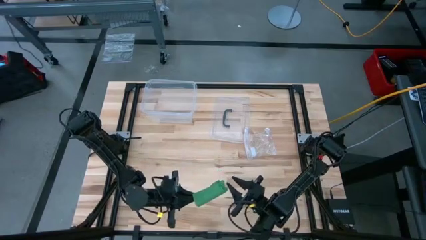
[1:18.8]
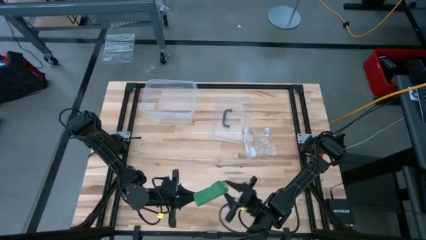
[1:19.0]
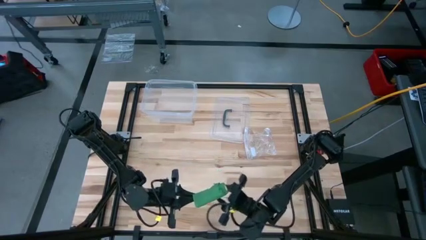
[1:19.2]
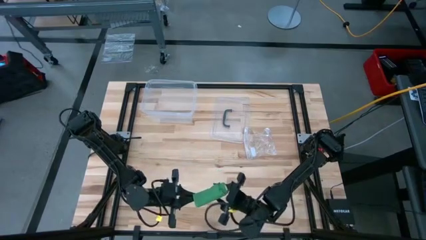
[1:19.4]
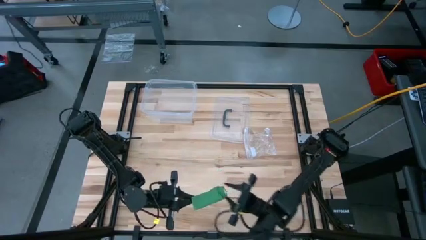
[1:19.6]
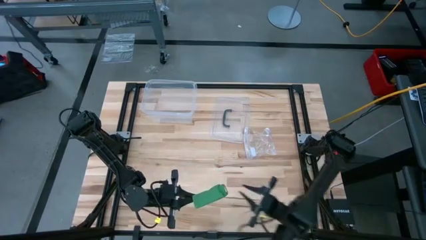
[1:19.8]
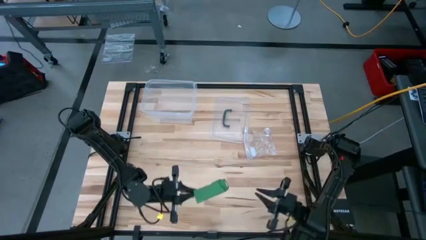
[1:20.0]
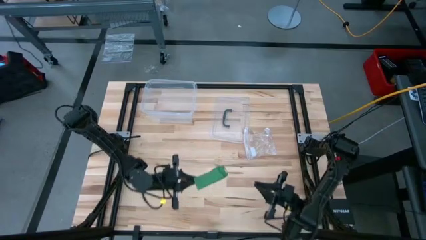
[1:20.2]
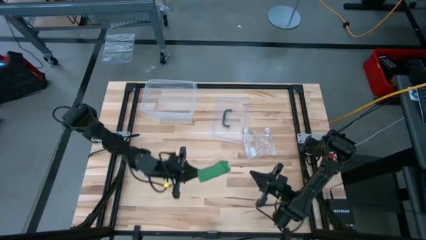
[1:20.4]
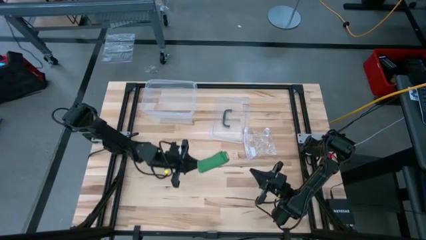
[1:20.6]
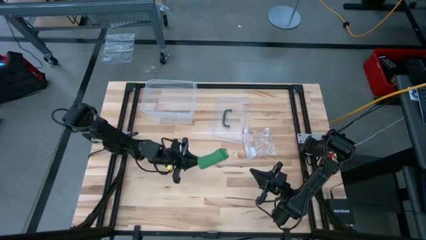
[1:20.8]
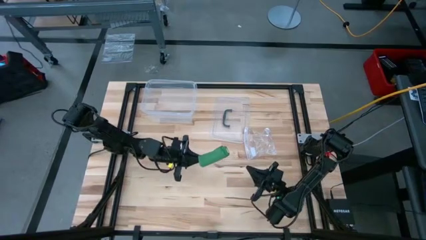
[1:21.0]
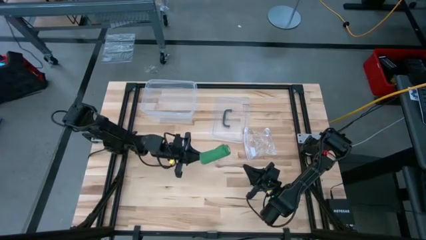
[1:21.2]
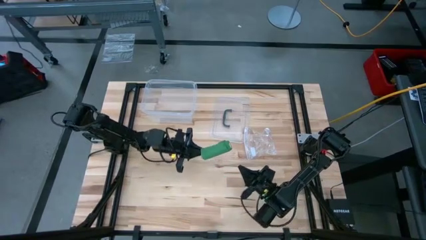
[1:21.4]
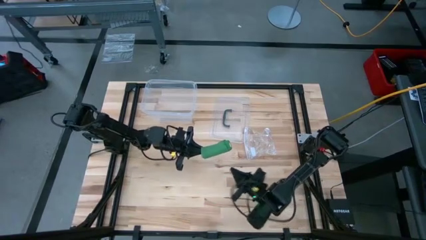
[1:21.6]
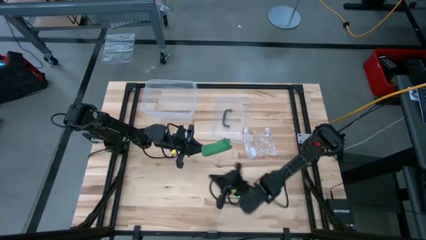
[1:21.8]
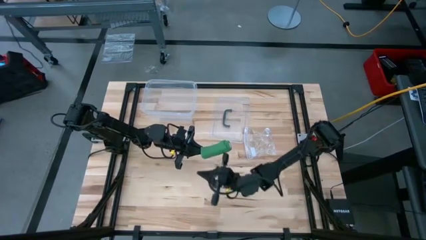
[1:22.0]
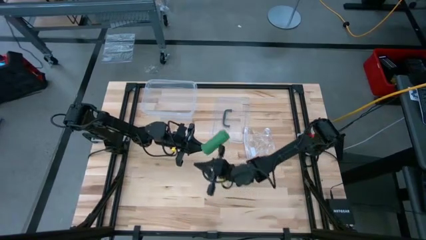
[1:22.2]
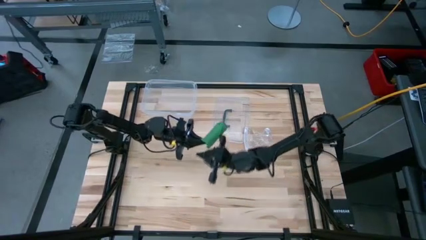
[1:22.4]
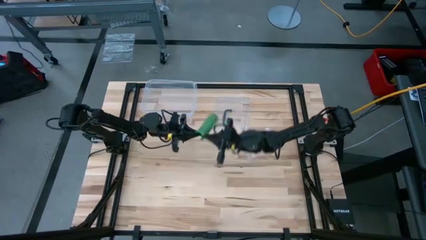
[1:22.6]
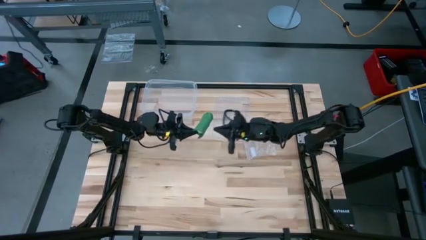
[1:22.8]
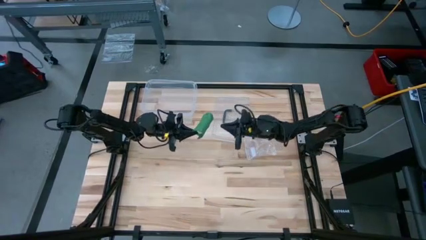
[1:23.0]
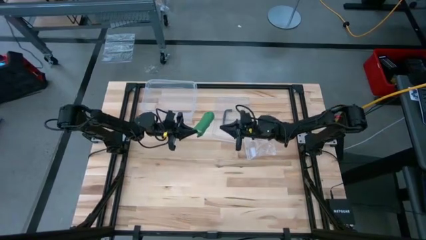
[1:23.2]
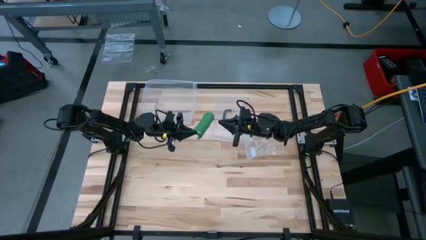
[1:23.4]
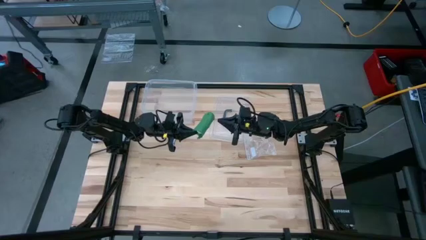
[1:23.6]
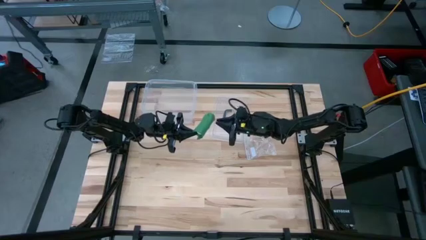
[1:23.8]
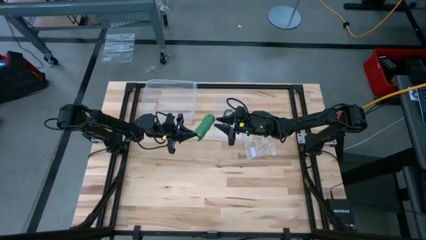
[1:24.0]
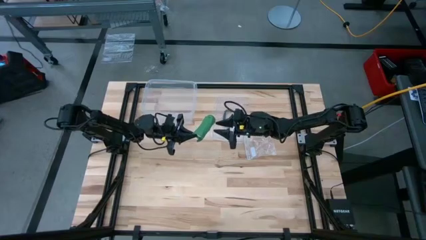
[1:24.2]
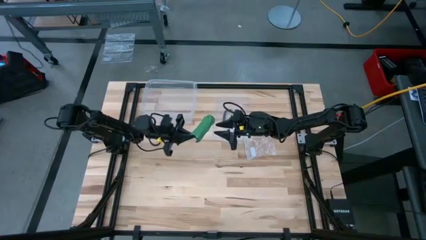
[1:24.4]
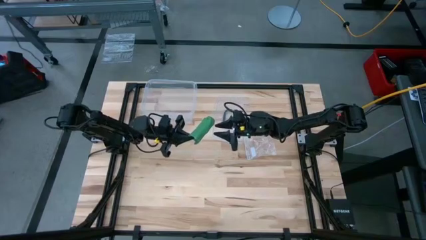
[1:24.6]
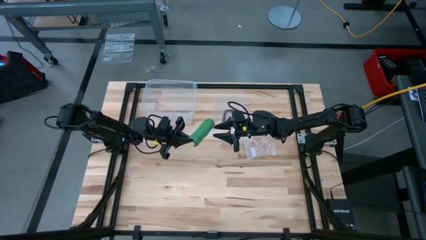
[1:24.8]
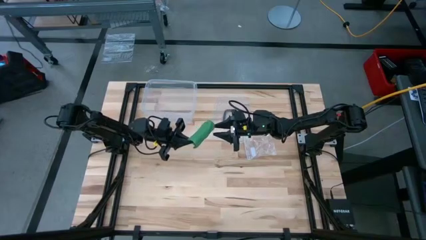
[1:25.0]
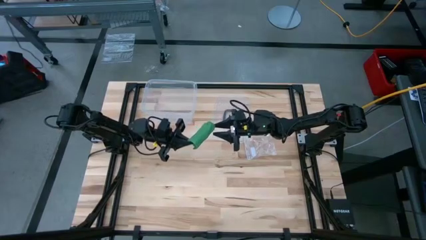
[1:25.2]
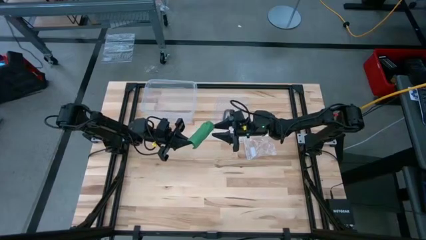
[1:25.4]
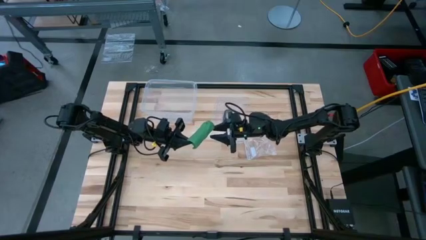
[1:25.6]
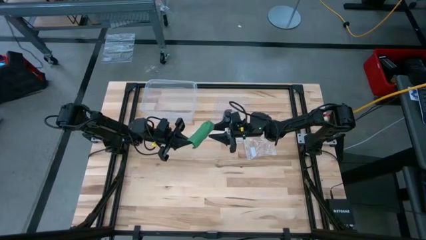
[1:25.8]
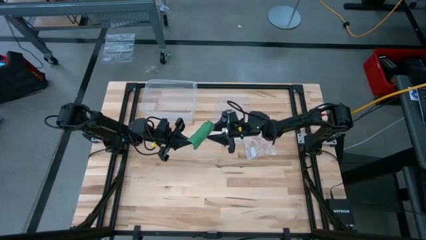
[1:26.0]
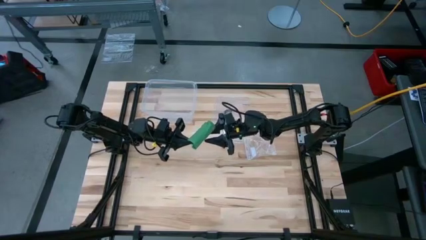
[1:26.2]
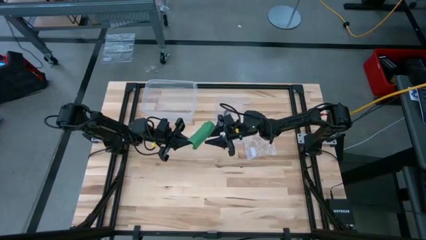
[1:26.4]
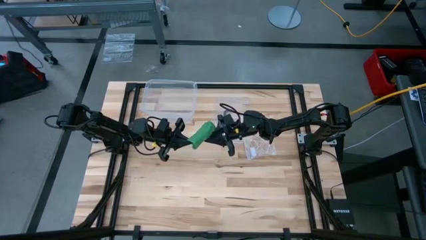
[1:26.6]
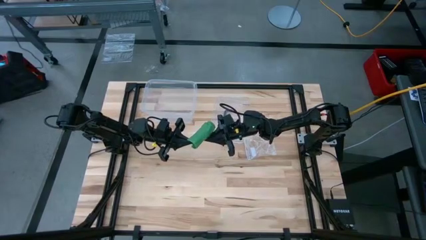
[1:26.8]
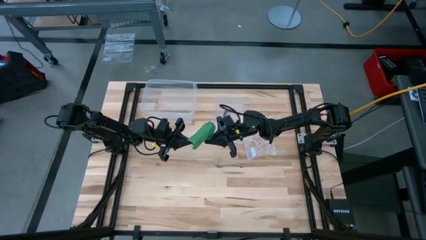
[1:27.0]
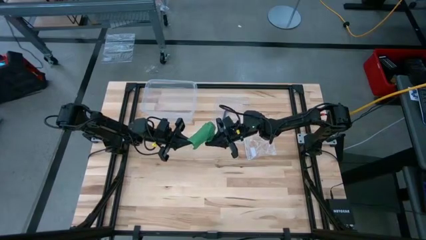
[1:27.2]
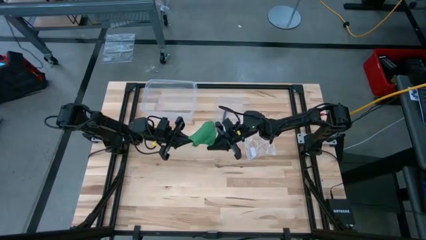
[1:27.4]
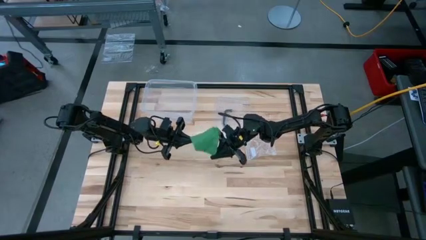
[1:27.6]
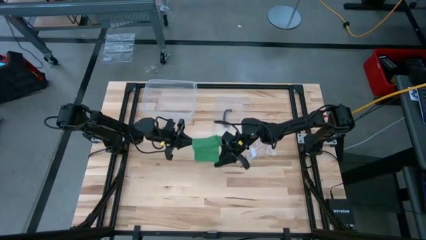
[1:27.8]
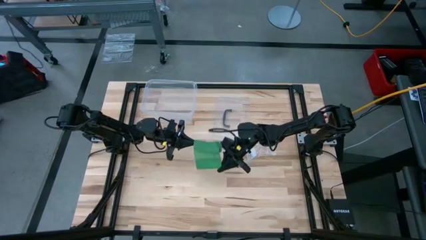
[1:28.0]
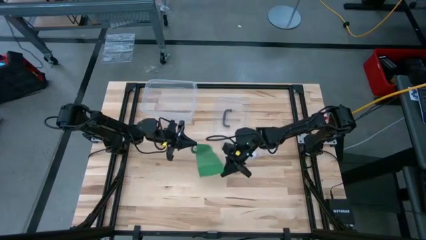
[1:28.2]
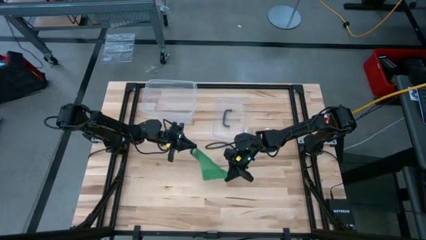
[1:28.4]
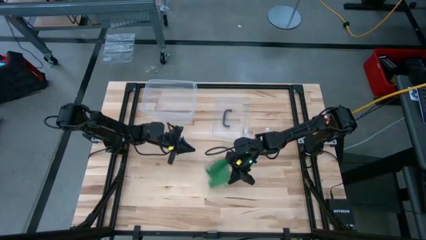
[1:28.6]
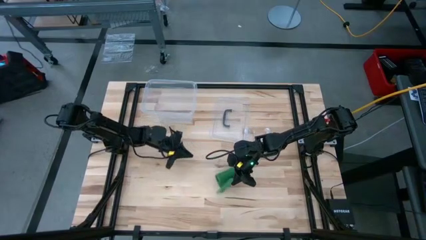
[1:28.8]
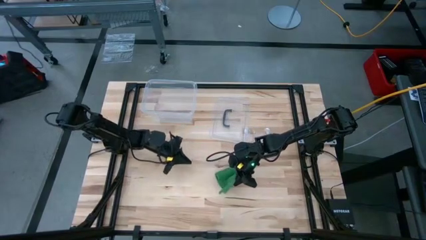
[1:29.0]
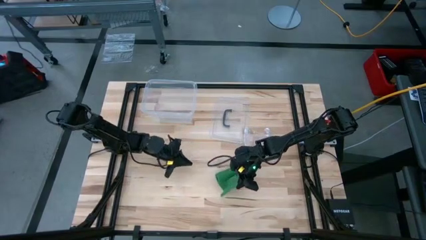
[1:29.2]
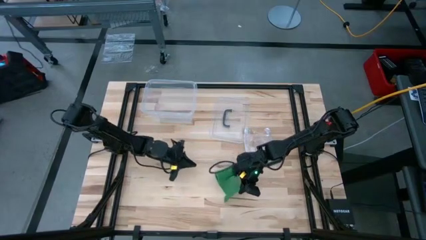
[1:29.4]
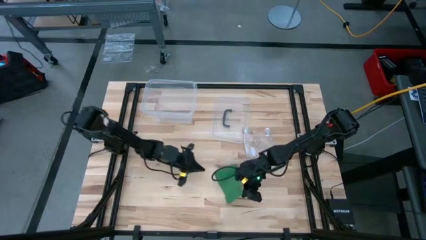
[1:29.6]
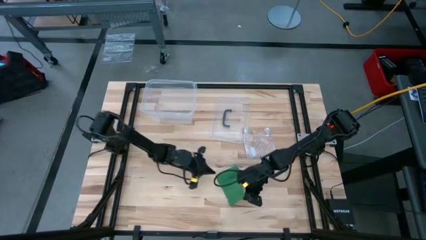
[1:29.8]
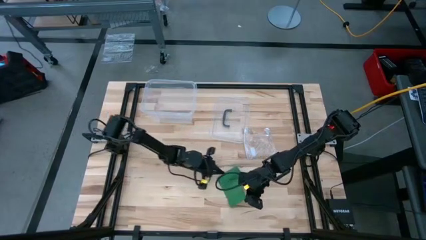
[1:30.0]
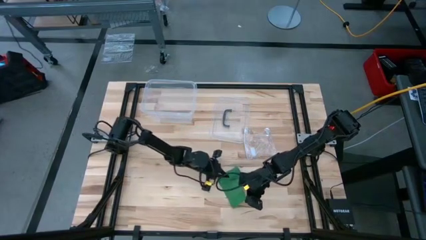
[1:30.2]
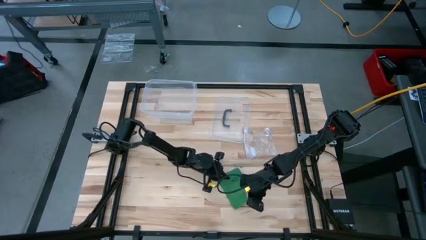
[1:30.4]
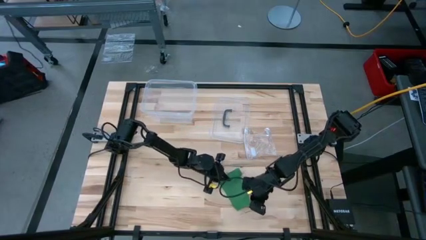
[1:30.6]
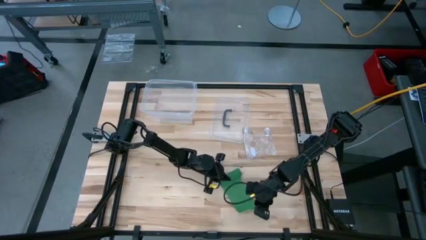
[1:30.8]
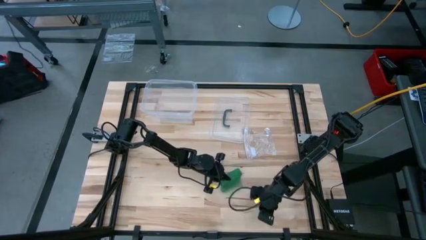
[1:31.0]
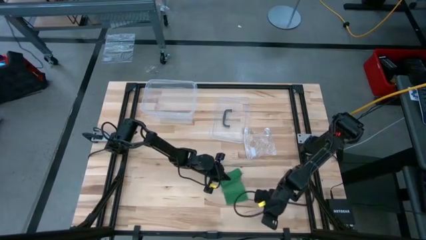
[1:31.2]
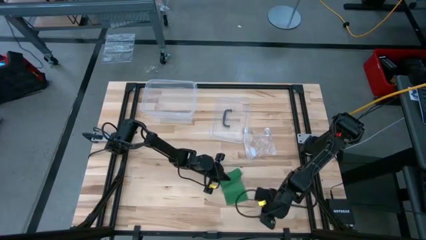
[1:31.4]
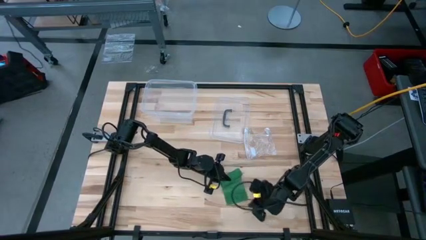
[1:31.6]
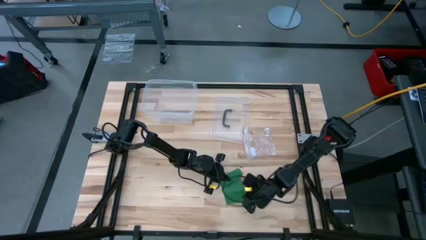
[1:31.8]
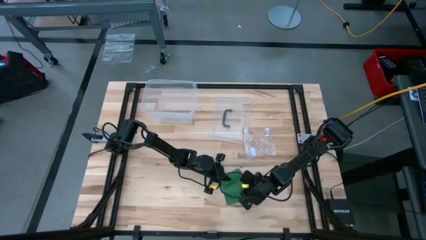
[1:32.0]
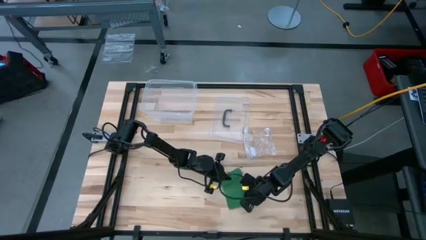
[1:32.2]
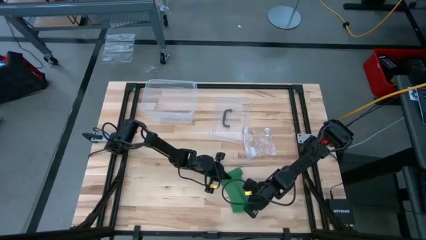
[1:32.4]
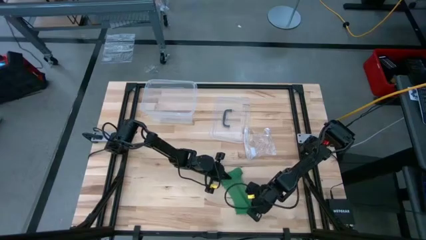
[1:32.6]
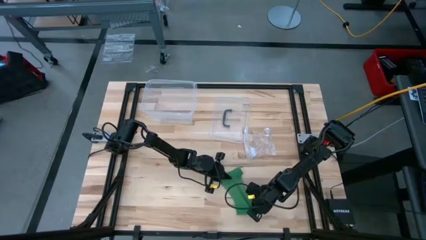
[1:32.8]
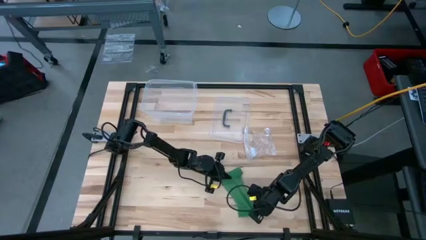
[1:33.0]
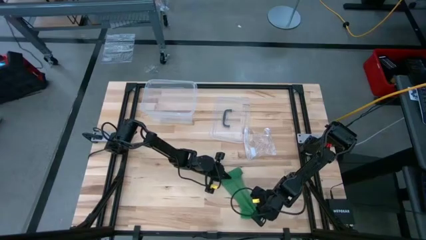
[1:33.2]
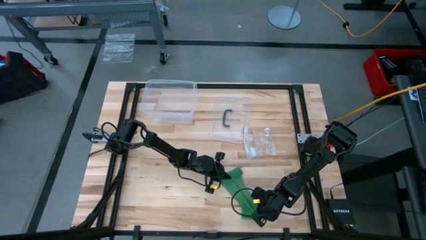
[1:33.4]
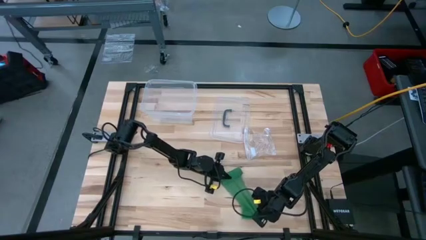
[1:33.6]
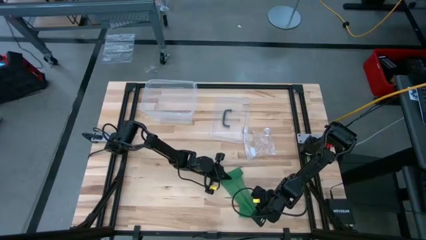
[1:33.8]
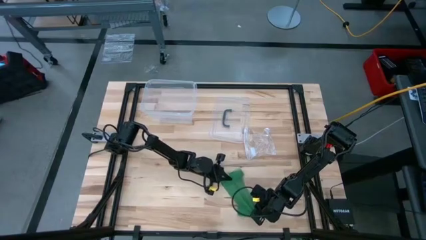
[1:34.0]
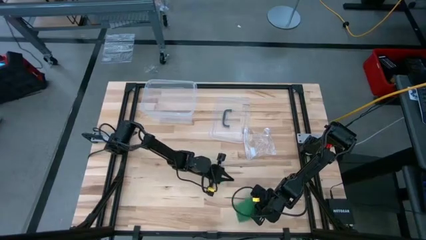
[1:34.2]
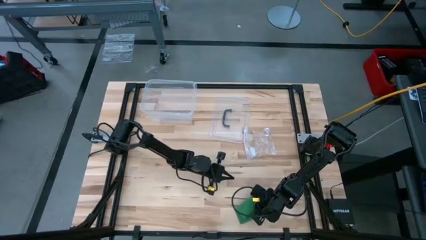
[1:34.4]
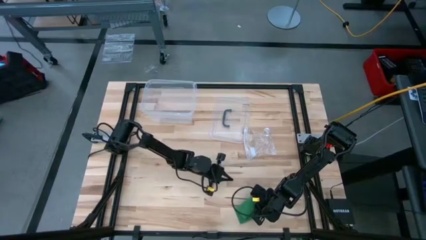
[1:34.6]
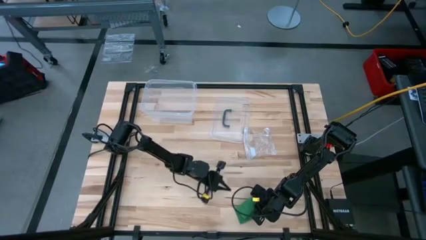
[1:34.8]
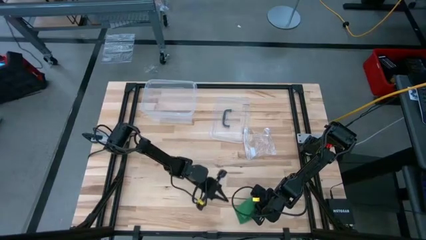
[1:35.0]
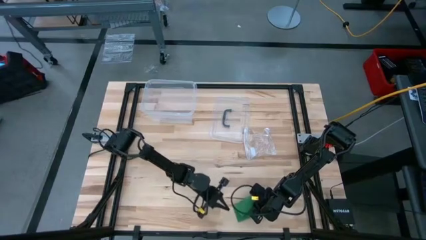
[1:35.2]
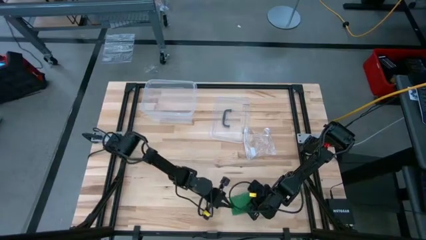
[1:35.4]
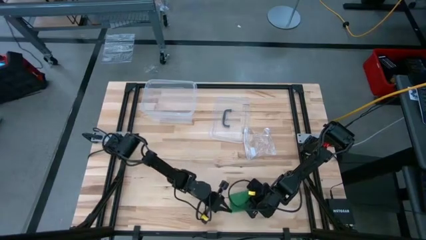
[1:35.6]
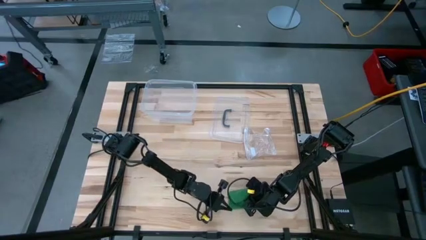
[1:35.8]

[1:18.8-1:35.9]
Task: Roll bandage
Roll the green bandage
